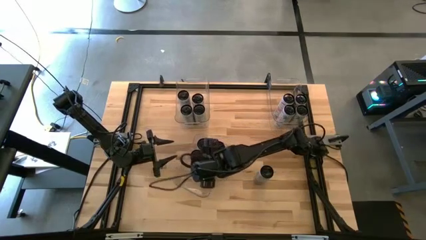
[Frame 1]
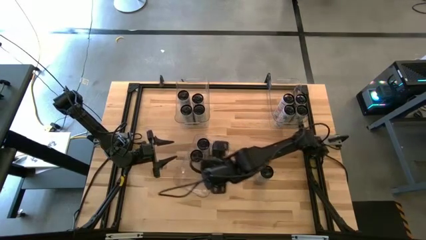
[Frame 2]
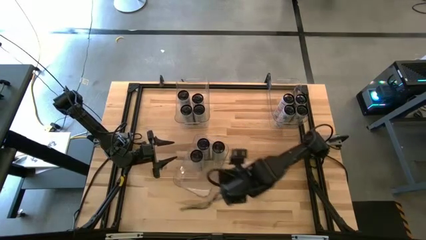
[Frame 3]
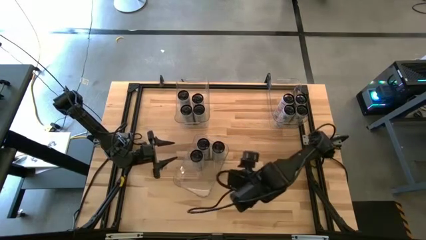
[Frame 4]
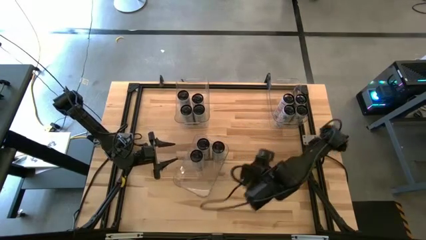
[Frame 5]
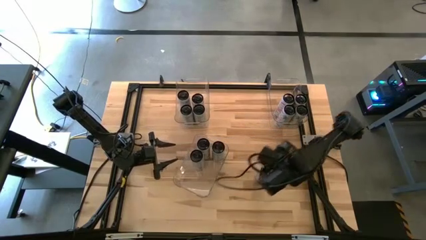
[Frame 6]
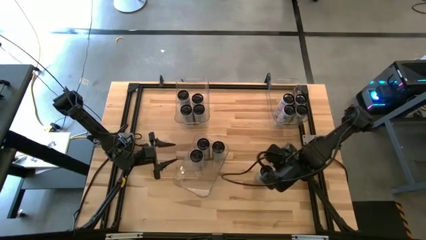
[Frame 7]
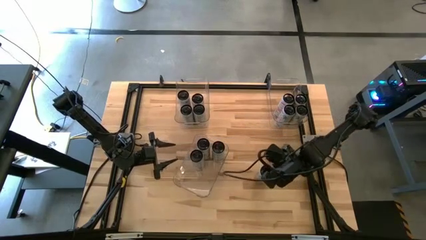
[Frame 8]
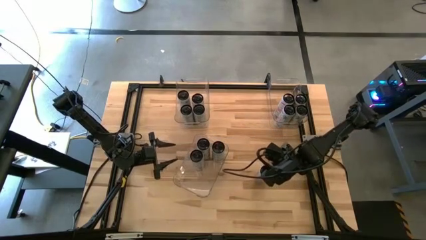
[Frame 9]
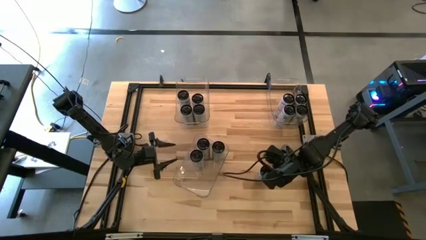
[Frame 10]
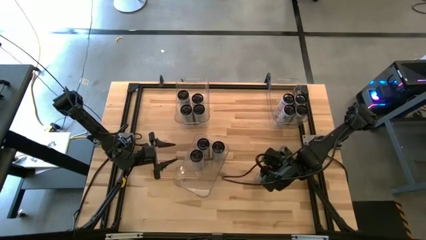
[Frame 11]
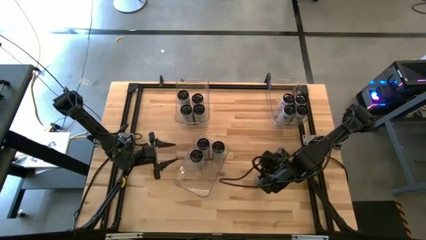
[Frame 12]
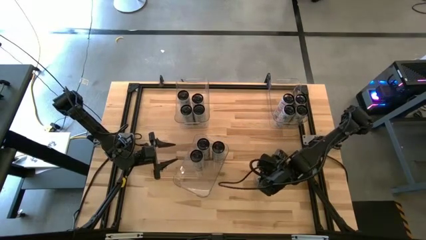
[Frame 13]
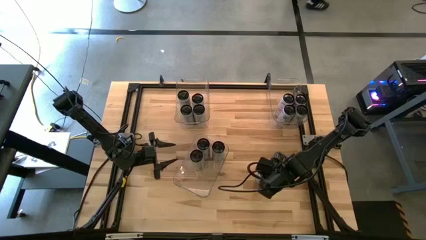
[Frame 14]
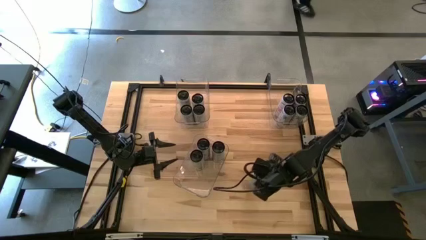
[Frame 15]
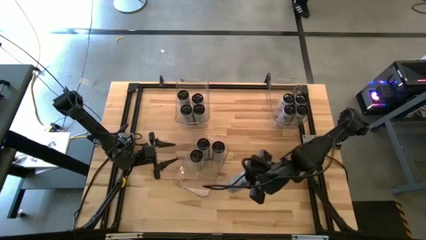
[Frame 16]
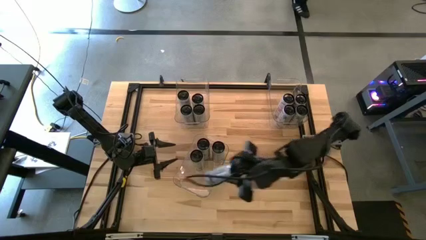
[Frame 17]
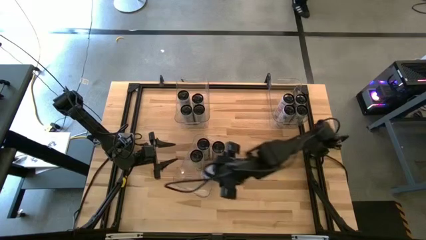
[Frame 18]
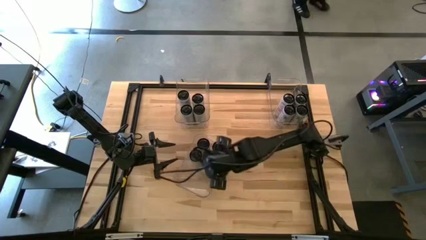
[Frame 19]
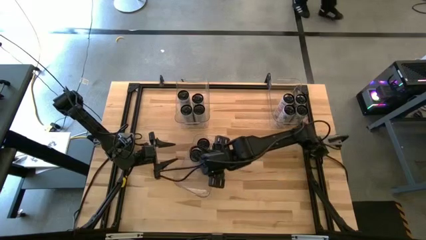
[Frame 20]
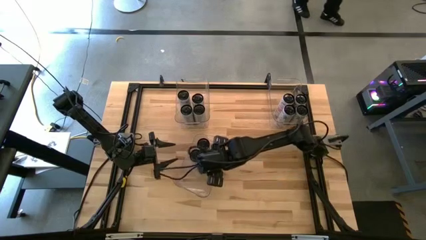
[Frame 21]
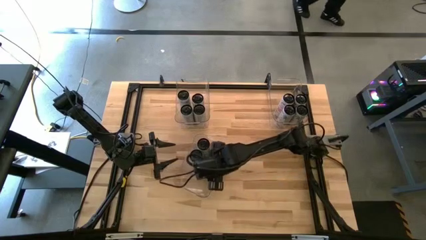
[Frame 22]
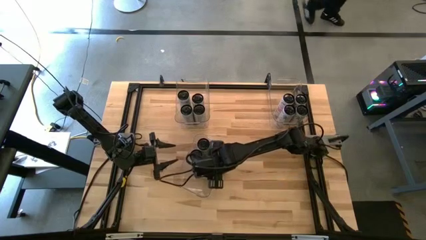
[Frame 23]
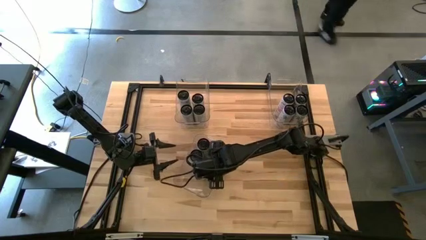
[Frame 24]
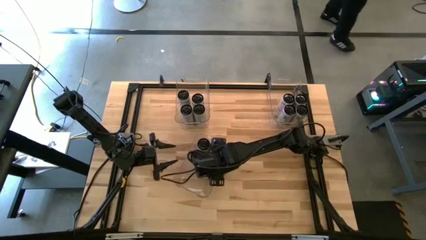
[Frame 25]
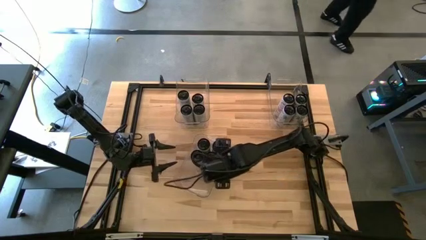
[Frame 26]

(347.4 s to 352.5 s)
Task: Sort soda cans
Put the white/blue soda can into the bottom center transparent bin

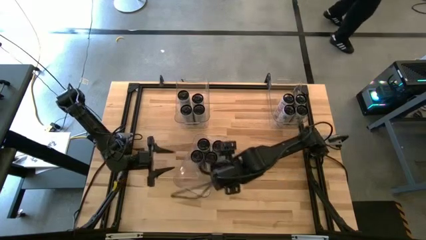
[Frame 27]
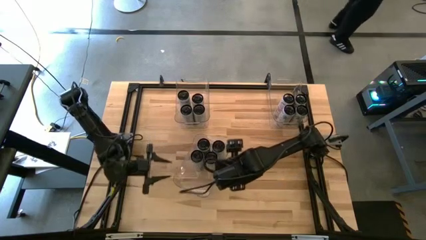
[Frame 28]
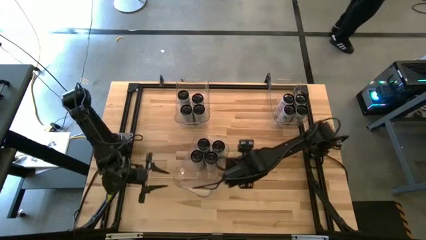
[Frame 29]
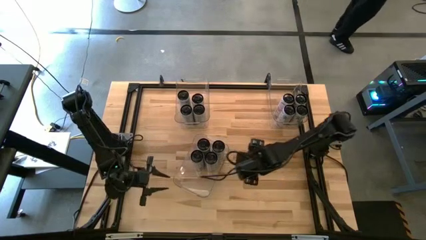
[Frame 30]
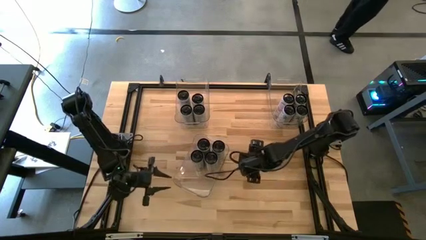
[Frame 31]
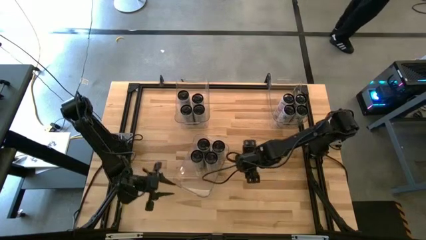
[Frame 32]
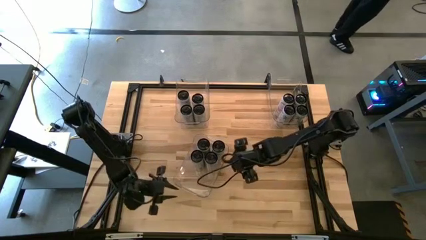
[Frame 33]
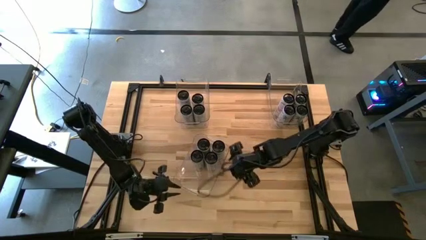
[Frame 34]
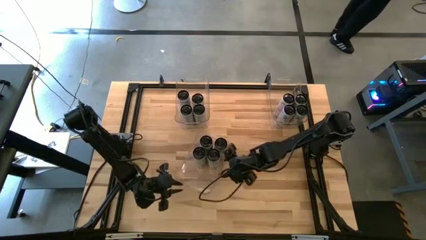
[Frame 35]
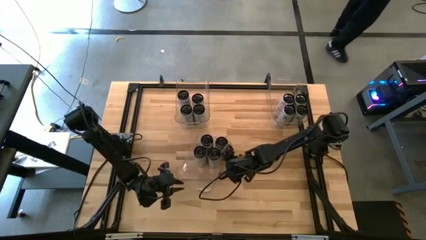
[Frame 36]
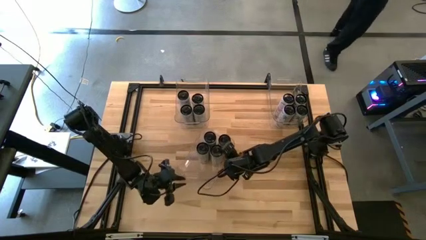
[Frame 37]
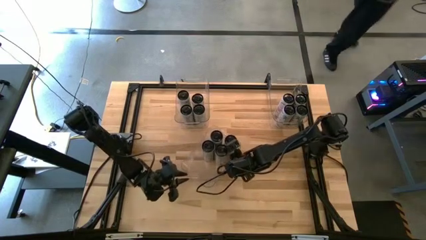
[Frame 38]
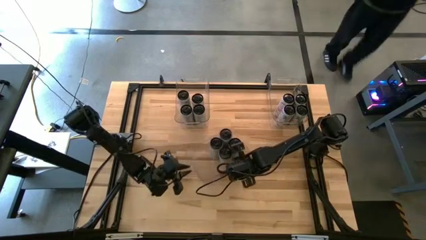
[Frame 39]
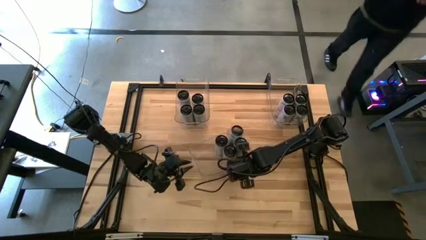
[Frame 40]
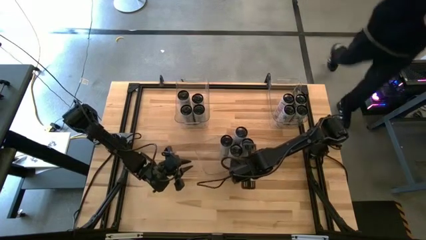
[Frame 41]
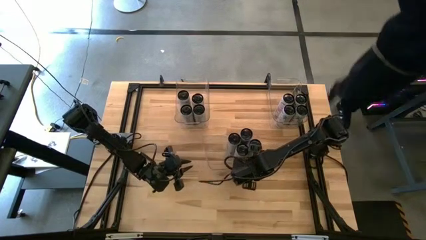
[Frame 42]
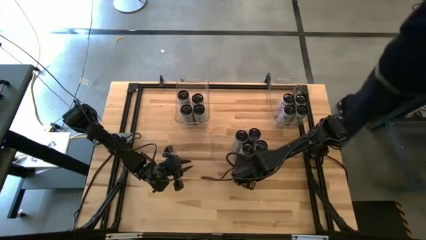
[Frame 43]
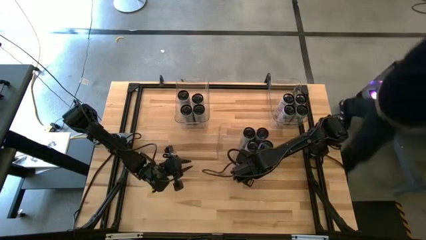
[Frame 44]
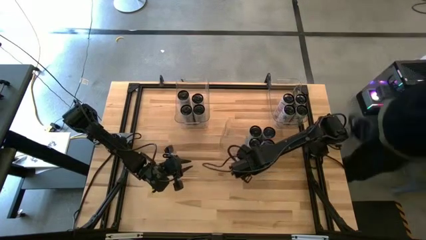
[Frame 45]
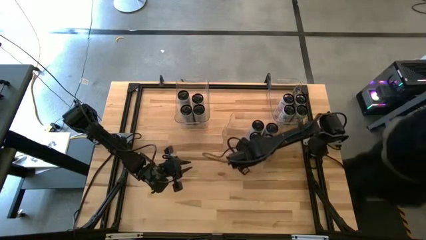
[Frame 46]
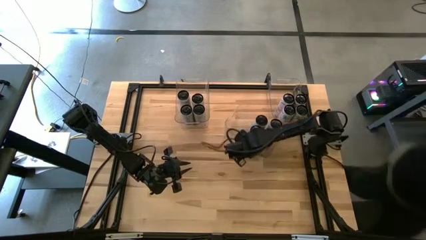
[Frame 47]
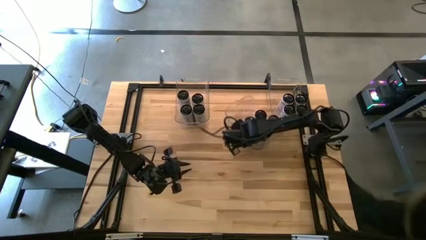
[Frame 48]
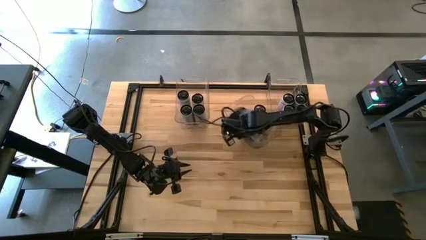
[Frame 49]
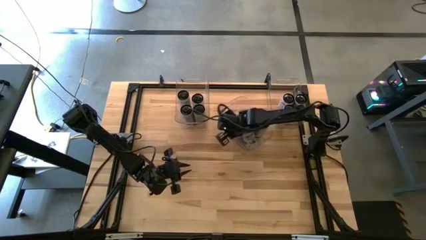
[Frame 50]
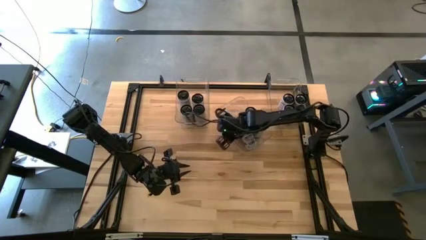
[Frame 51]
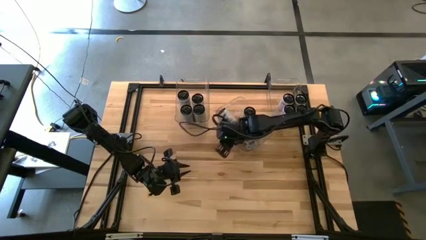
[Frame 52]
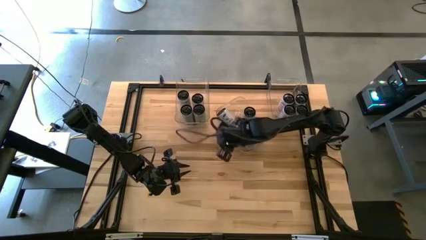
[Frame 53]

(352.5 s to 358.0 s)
Move the transparent bin to the top center of the table

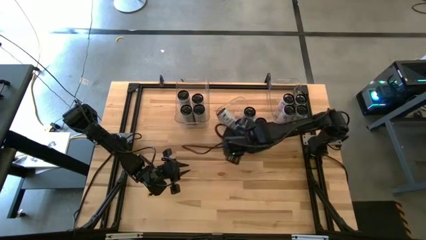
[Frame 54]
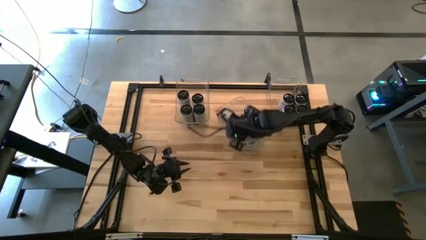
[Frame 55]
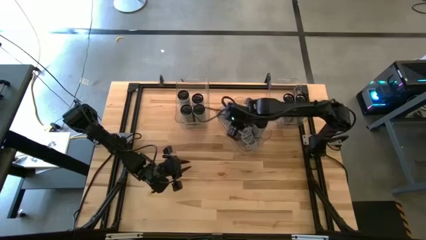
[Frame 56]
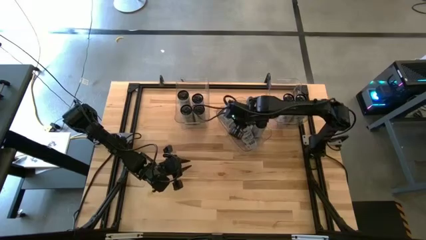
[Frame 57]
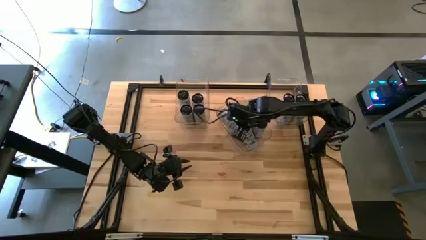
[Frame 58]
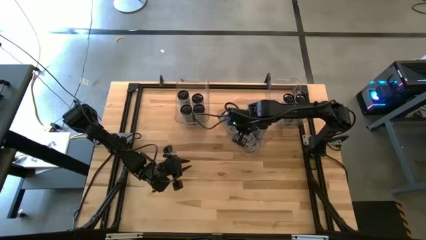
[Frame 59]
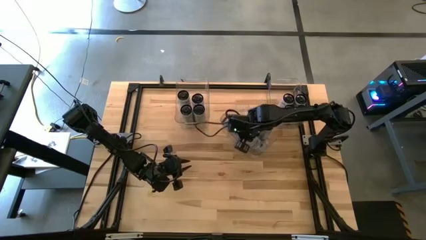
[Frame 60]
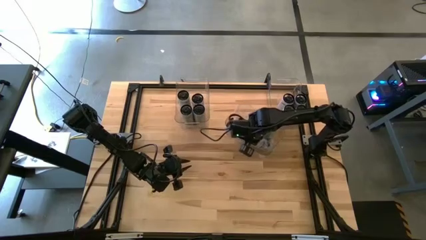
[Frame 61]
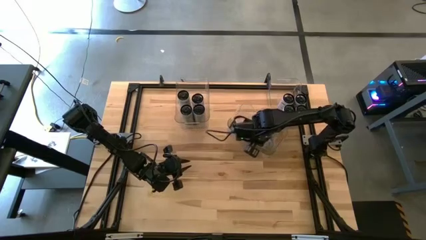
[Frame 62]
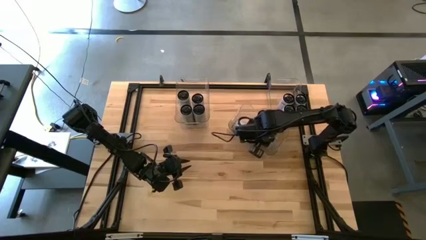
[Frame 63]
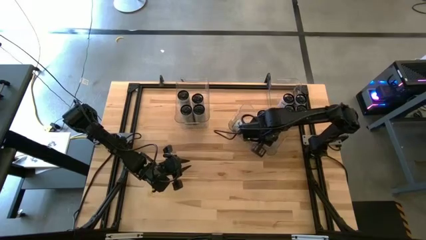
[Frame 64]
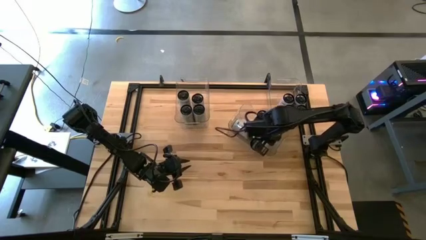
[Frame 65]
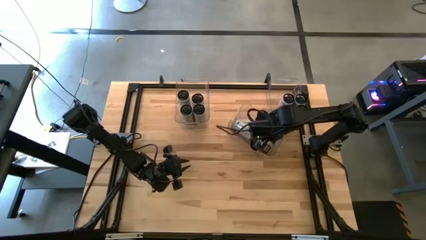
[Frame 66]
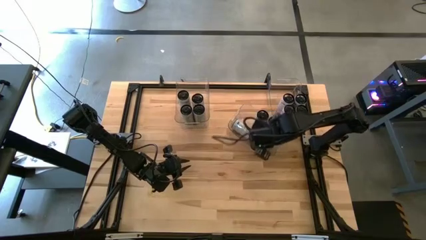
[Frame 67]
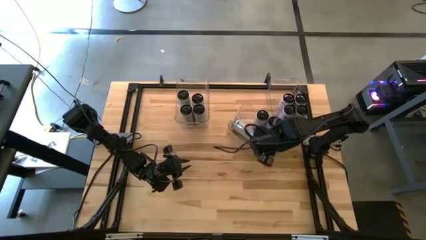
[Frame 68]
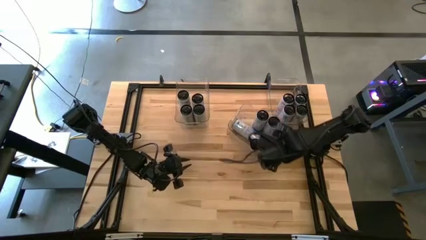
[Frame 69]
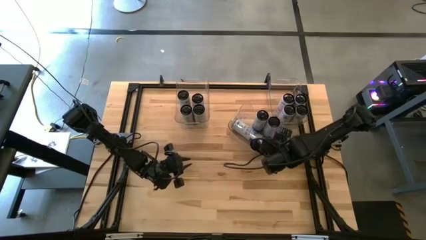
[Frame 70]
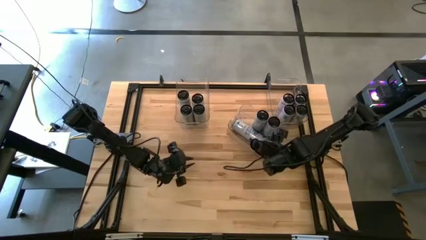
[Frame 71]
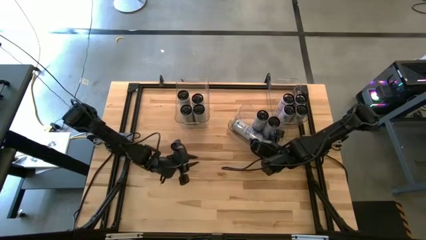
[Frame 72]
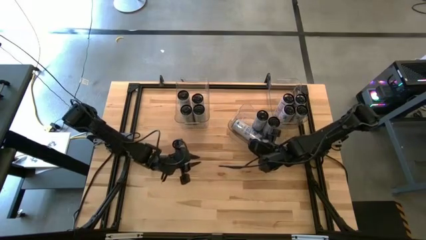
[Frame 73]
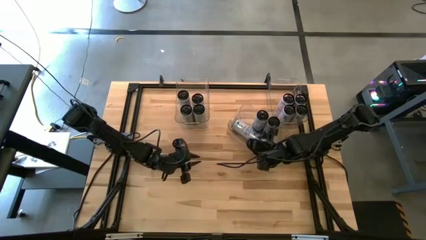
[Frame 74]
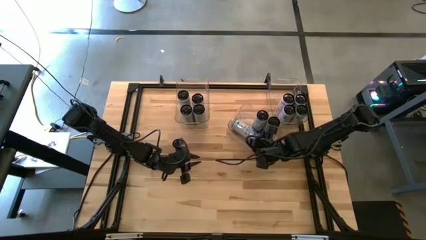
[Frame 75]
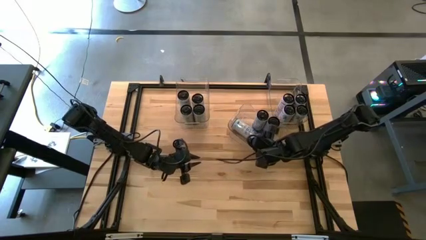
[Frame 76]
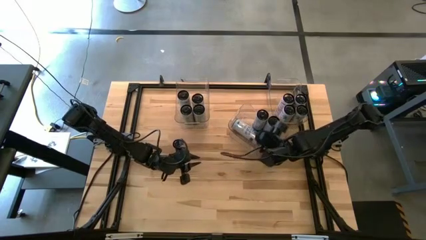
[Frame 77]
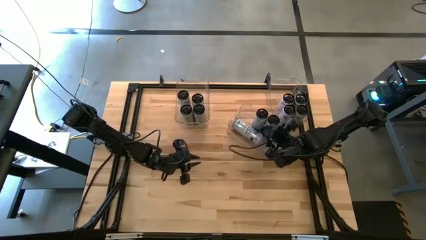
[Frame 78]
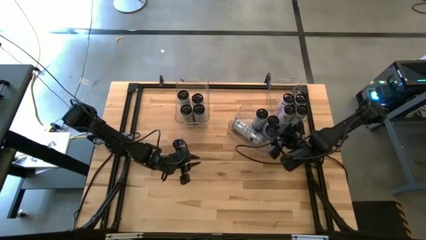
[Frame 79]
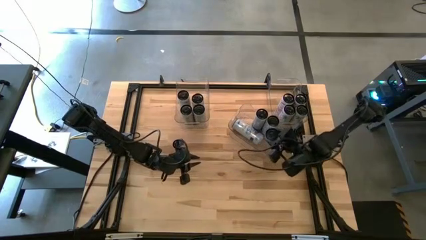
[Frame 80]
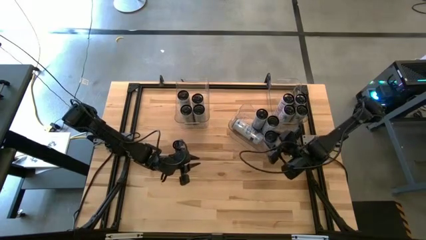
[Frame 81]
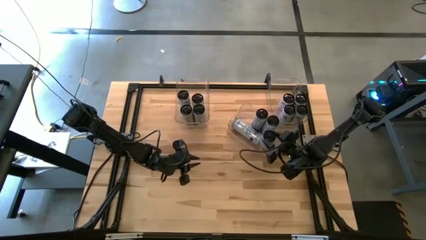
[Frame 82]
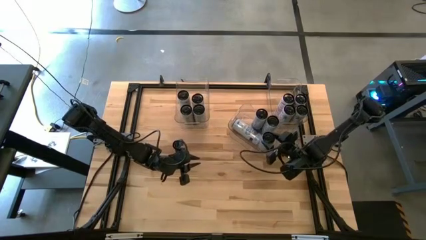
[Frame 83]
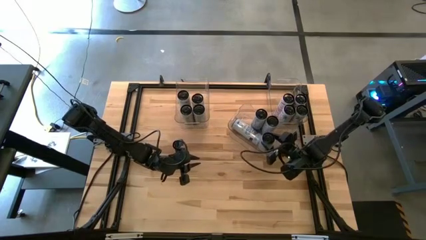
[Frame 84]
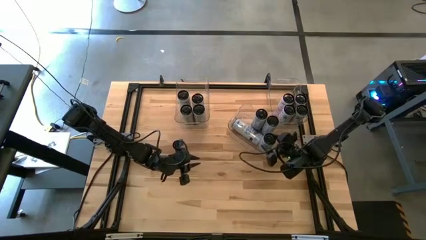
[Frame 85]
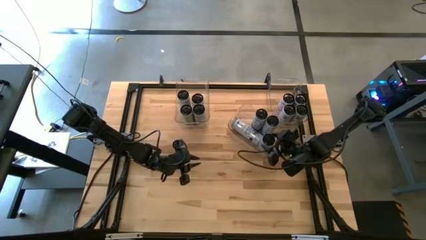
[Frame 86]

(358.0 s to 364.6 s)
Adjust the white/blue soda cans
